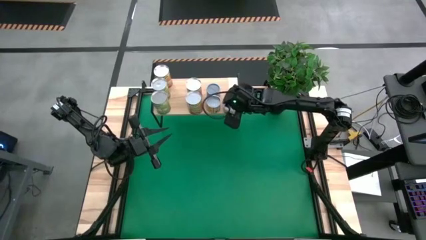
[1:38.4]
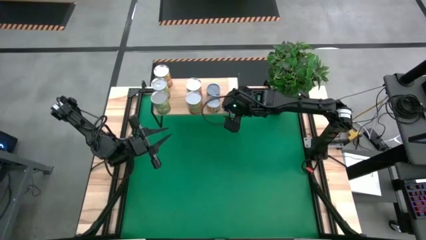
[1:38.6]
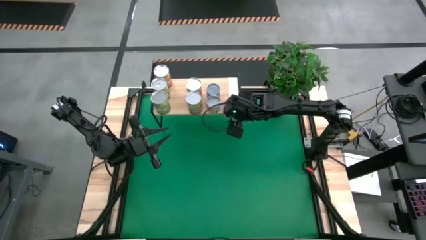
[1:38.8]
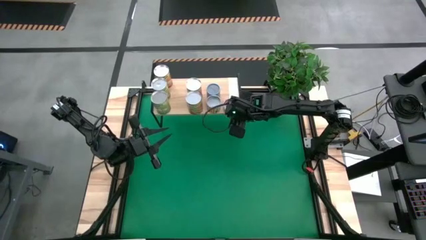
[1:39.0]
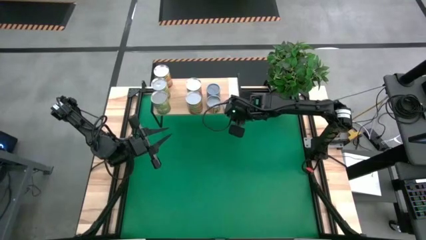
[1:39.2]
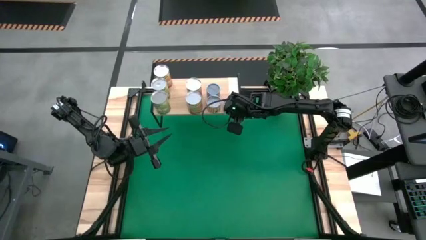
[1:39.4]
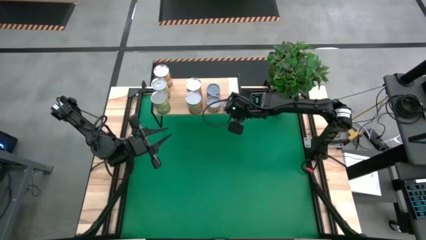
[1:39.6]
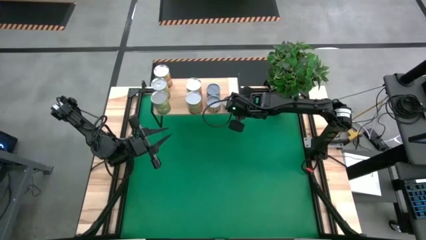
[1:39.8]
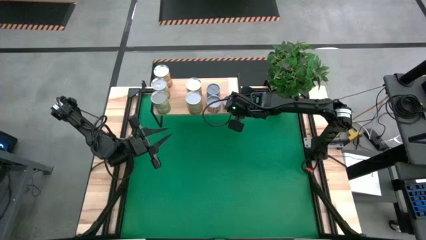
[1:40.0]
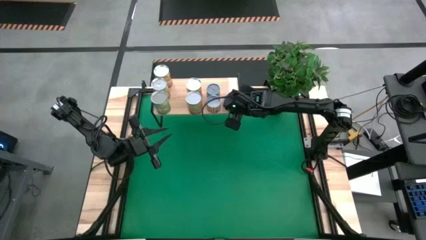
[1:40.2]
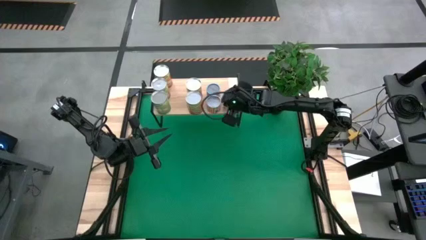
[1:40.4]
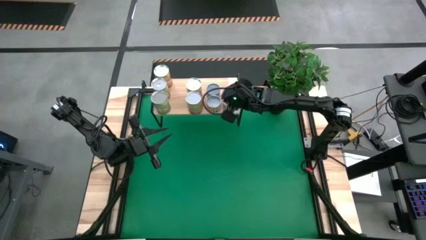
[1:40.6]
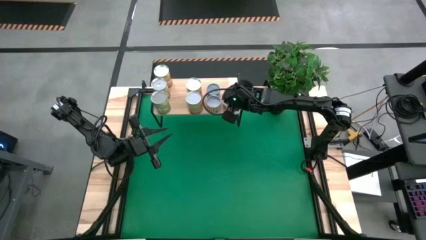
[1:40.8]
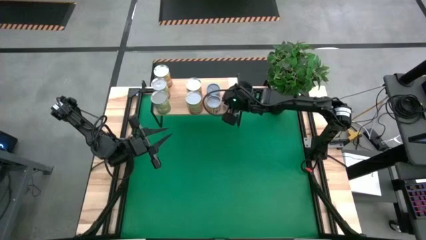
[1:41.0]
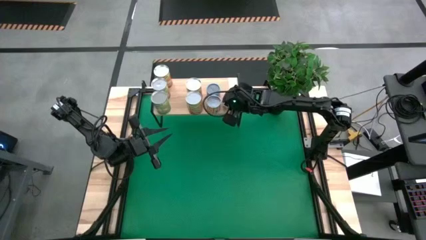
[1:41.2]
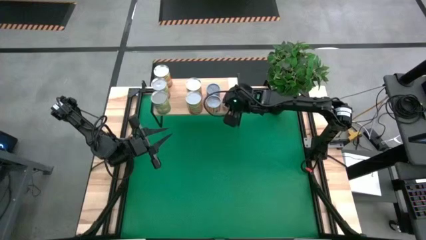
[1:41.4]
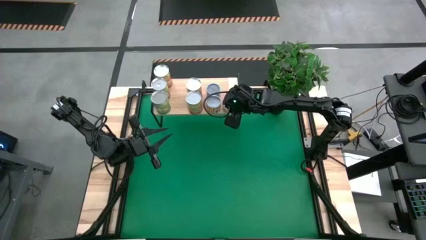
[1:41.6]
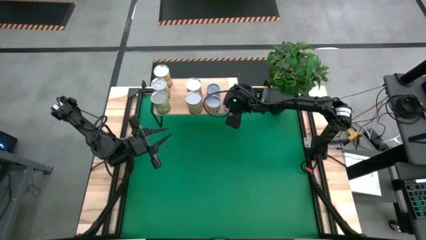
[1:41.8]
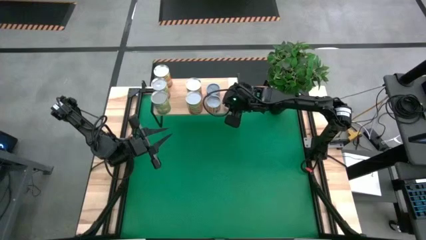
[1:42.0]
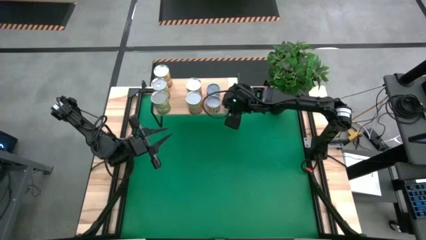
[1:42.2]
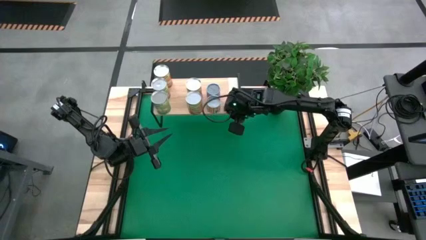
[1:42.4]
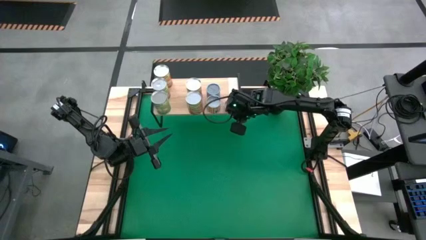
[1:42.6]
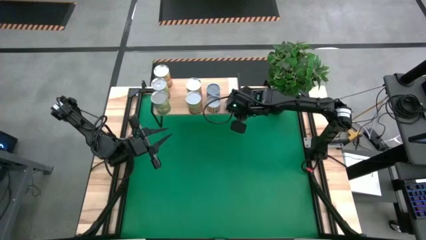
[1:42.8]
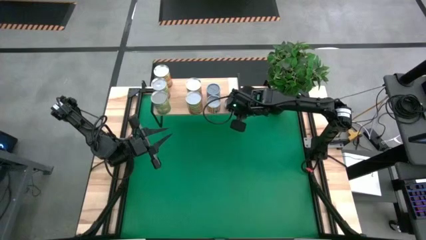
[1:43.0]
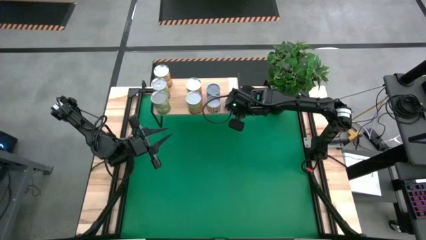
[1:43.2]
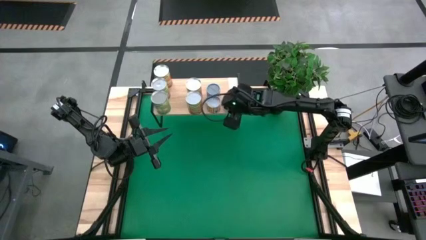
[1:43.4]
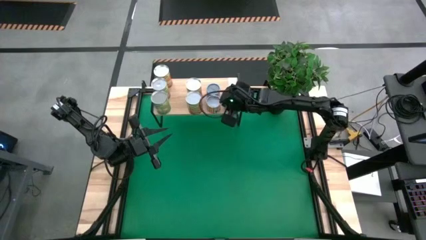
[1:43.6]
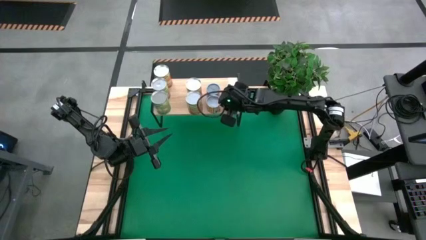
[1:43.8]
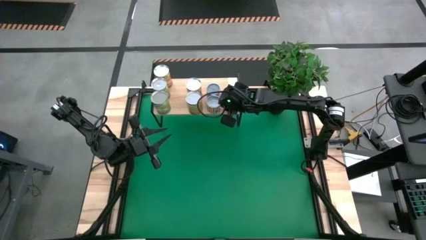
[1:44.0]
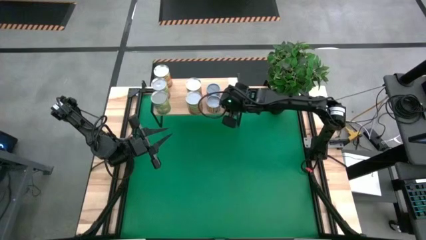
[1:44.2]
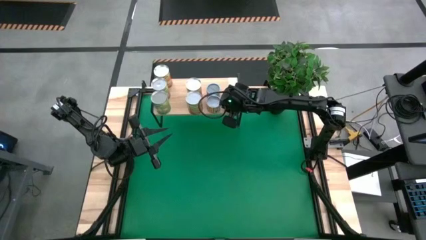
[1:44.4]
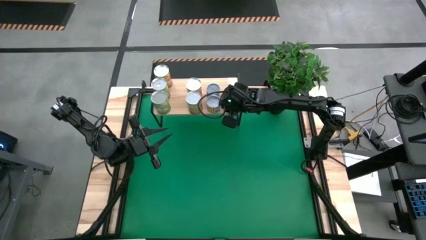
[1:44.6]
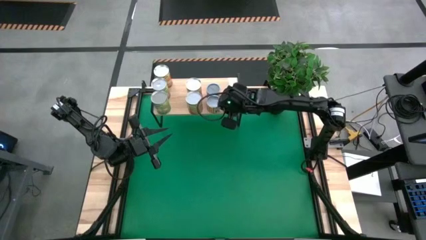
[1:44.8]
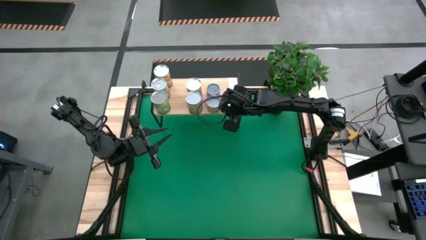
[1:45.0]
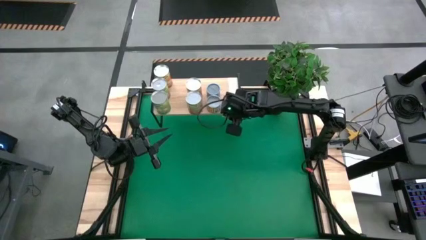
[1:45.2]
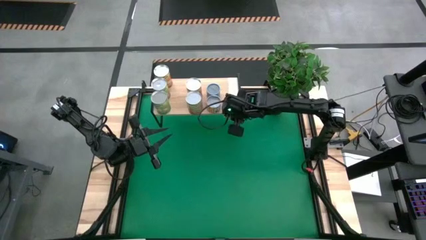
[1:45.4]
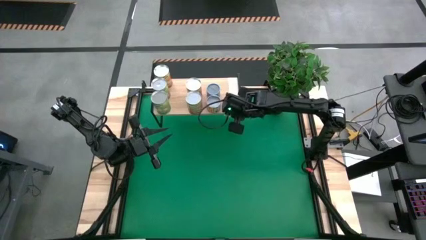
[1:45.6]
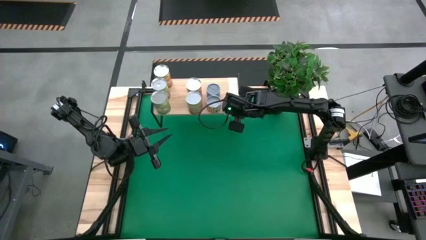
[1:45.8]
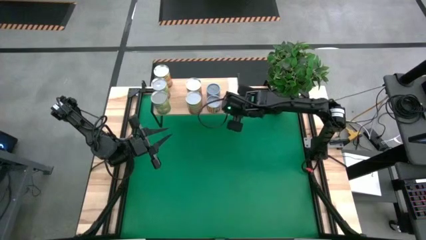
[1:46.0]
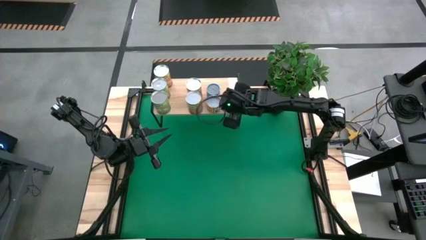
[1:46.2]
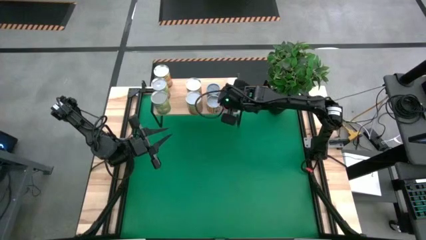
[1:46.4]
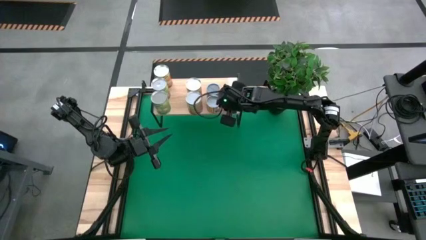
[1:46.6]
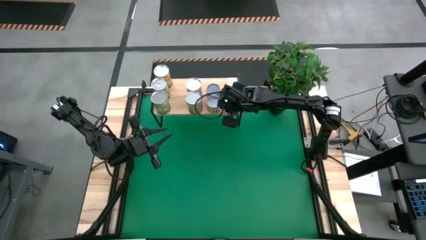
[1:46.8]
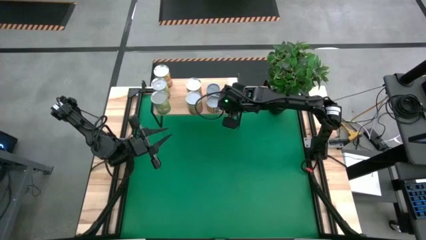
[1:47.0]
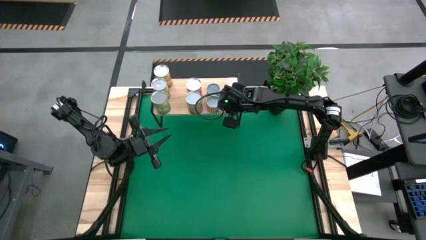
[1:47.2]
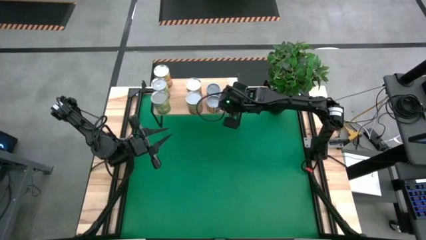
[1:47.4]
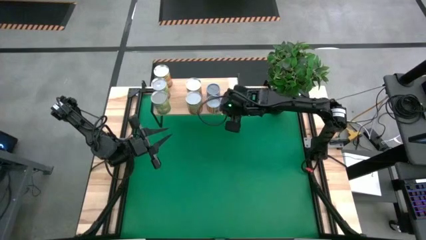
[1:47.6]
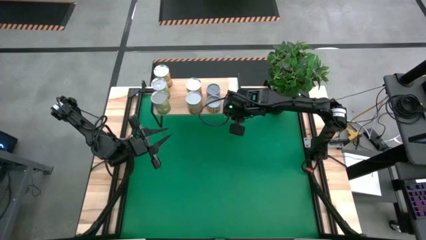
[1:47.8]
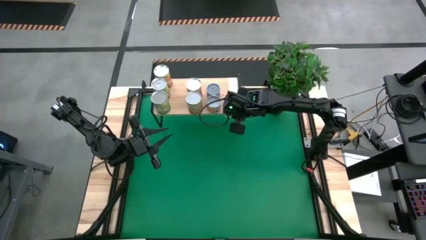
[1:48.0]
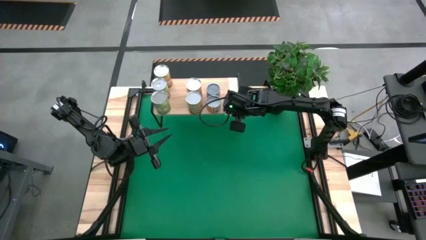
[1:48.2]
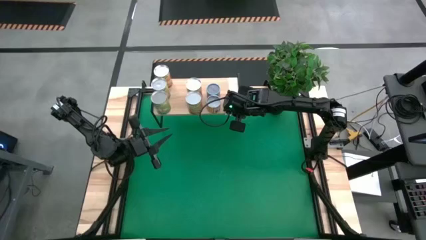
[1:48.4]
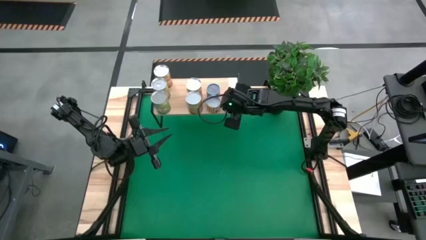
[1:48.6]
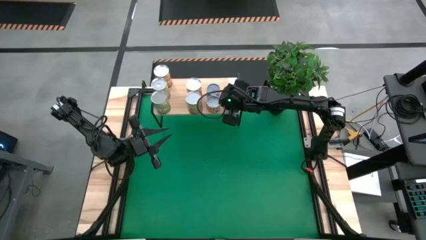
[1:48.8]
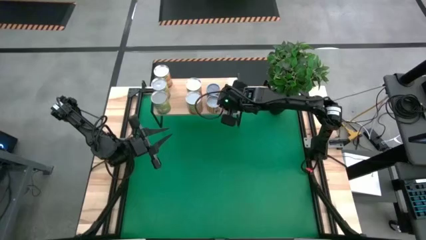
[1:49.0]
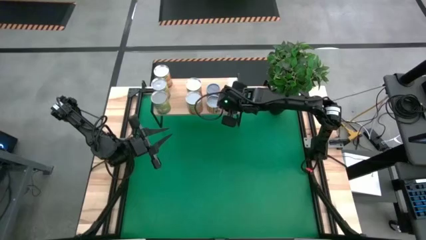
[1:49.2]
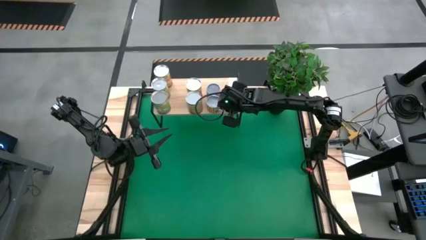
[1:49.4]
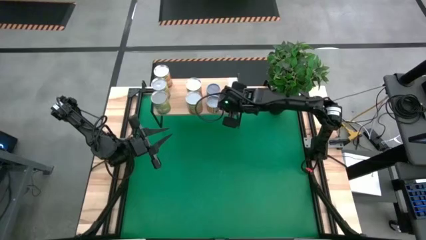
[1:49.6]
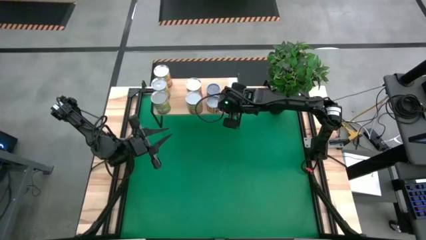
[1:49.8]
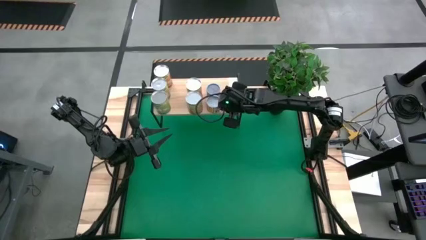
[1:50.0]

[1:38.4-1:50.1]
Task: Pick and place cans onto a shelf
Adjust the mushroom can on the shelf

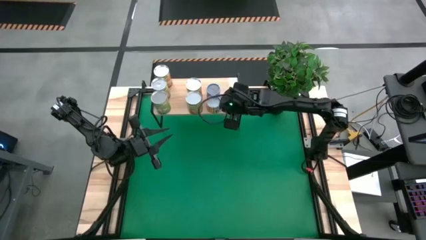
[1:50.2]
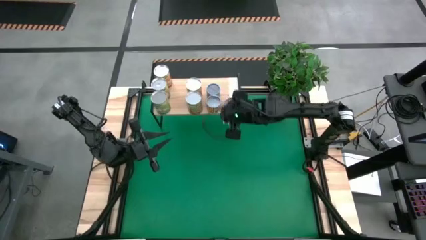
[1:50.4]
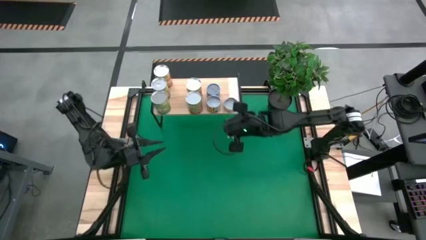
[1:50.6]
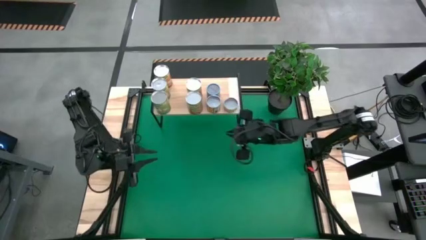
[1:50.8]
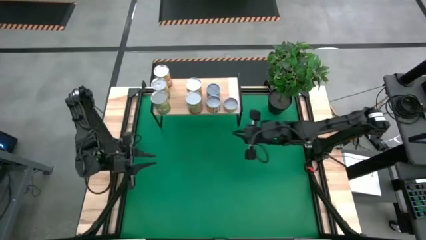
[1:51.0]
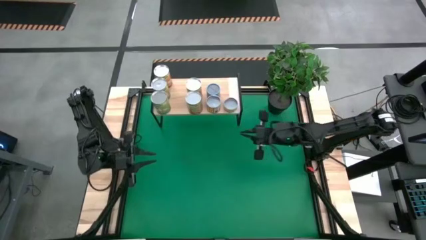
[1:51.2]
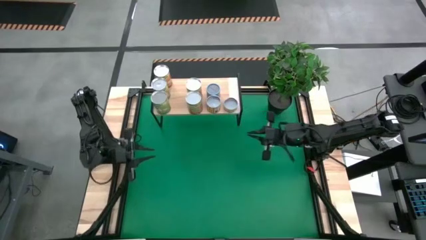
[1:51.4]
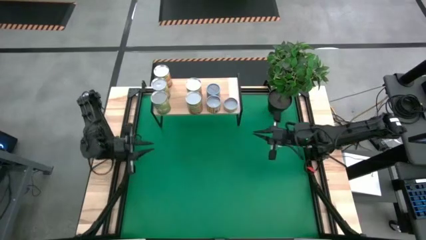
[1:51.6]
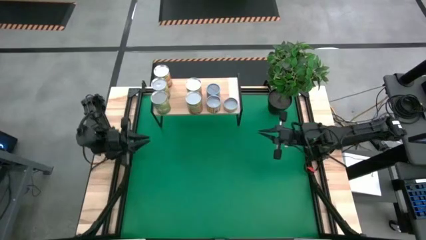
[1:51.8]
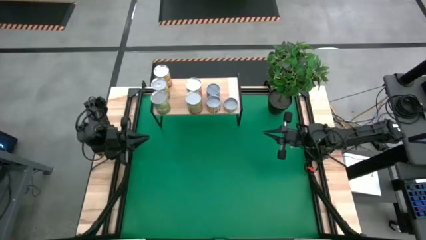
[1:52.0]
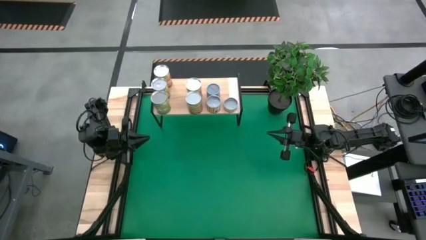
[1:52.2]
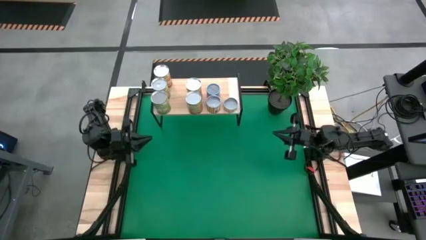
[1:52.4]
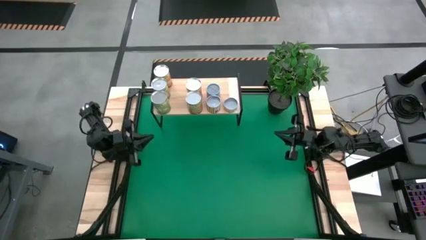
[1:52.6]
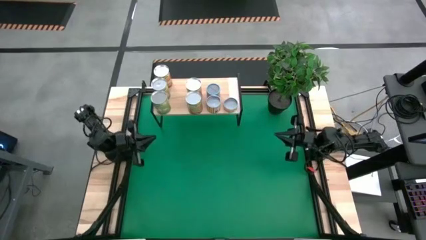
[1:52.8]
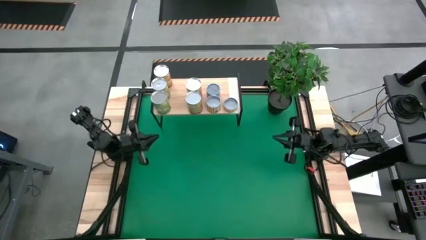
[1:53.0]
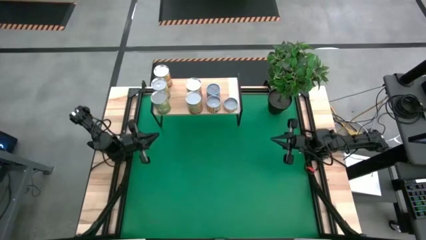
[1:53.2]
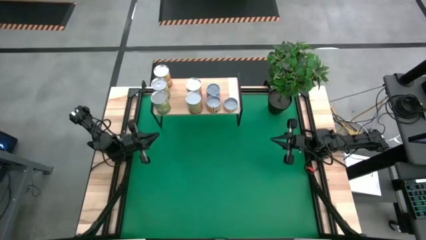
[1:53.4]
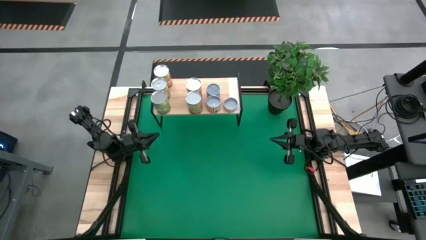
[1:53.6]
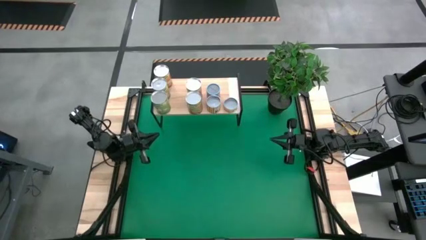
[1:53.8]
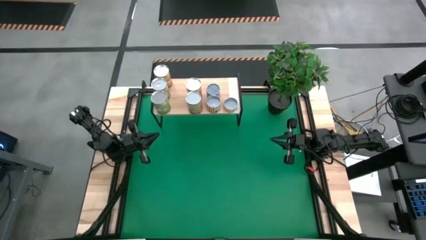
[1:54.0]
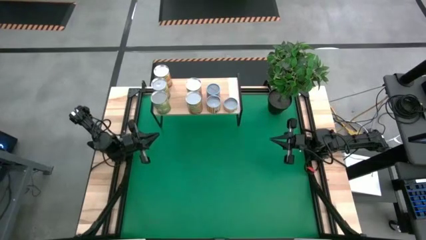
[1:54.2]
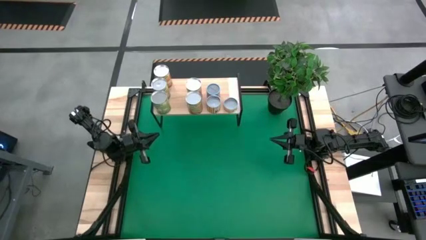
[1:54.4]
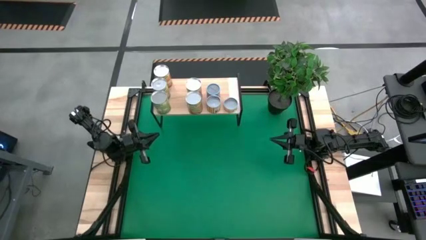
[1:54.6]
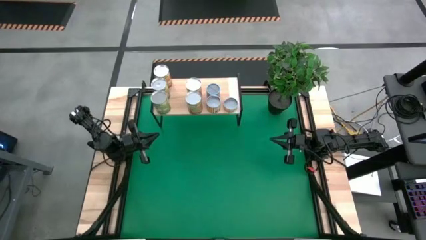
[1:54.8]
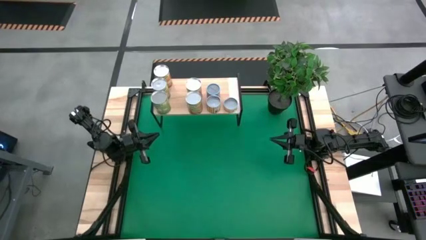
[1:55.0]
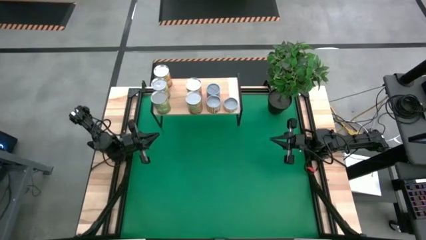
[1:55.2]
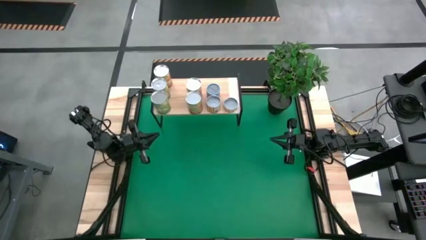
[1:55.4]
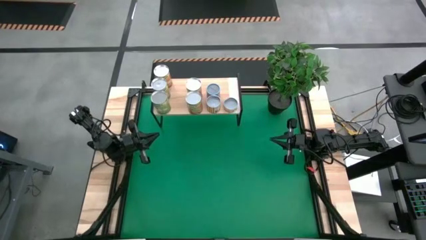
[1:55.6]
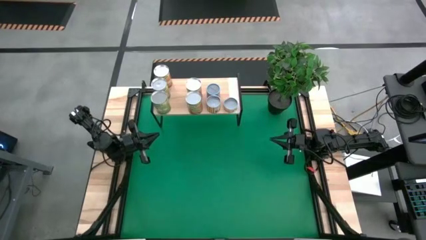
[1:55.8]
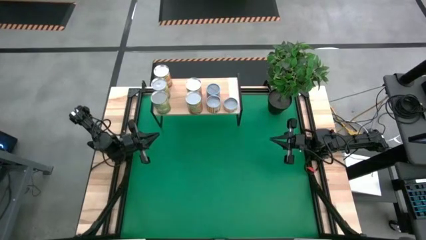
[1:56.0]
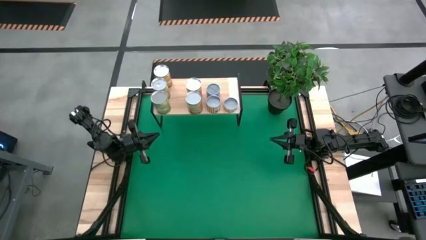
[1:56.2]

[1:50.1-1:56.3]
Return to Home Position
